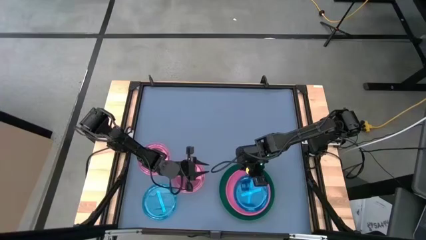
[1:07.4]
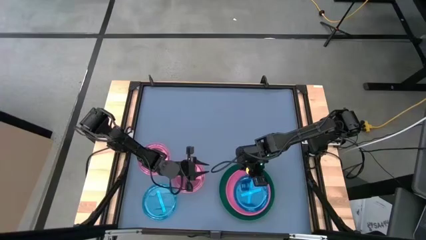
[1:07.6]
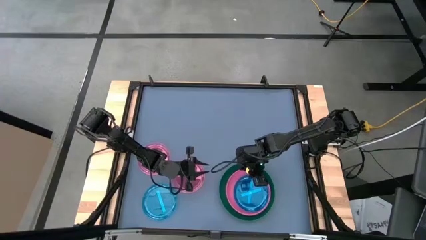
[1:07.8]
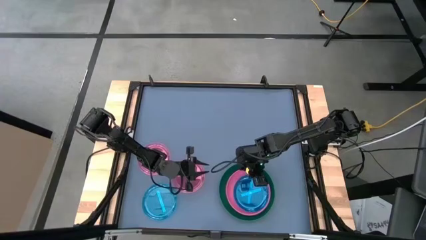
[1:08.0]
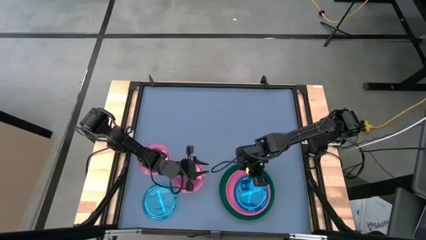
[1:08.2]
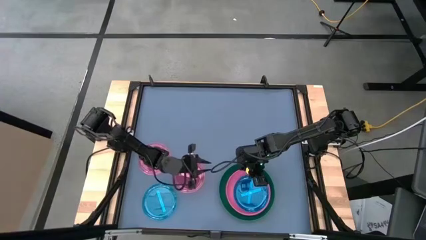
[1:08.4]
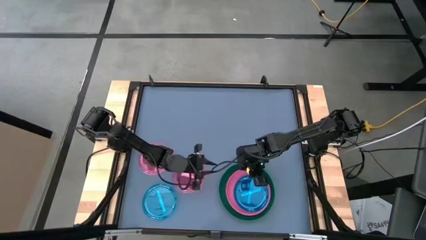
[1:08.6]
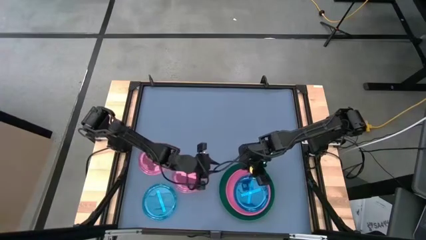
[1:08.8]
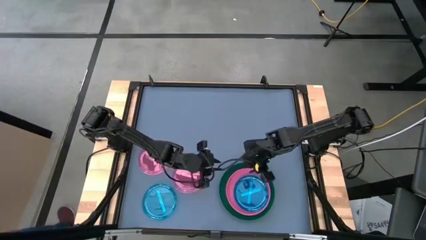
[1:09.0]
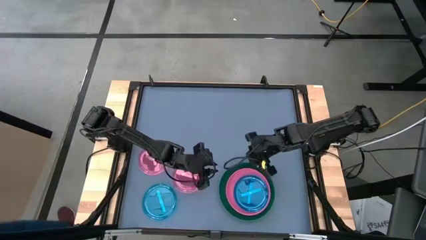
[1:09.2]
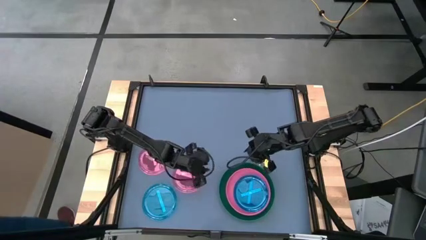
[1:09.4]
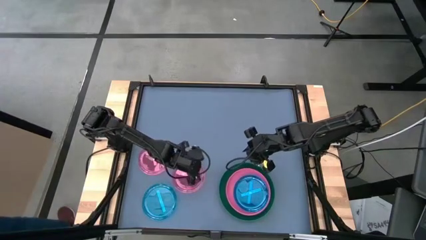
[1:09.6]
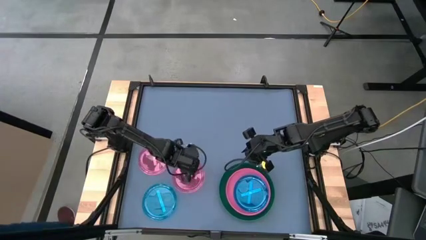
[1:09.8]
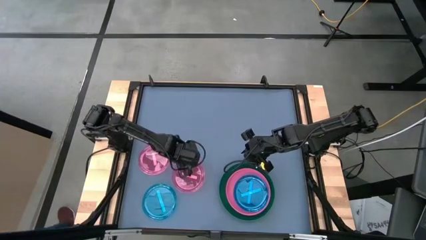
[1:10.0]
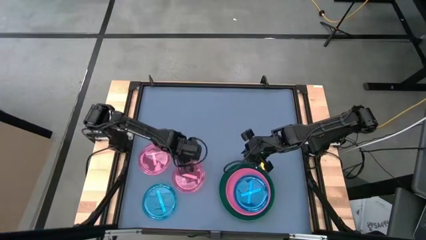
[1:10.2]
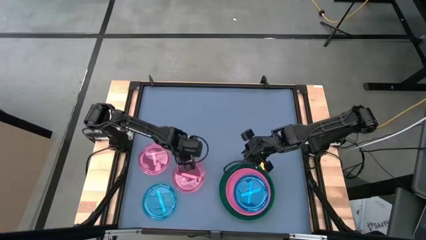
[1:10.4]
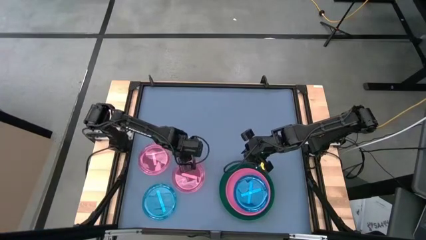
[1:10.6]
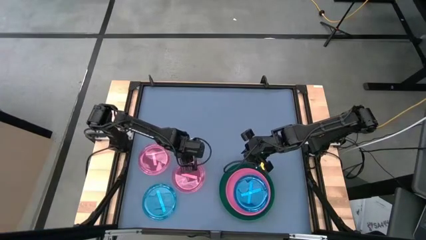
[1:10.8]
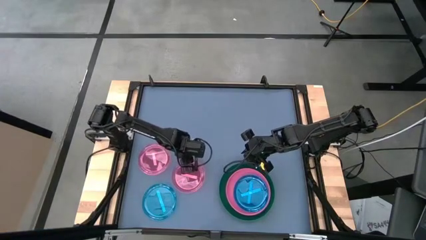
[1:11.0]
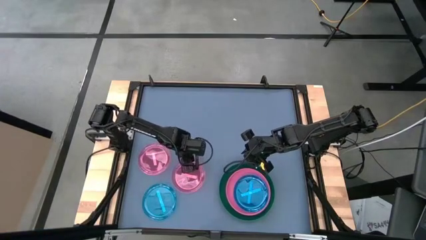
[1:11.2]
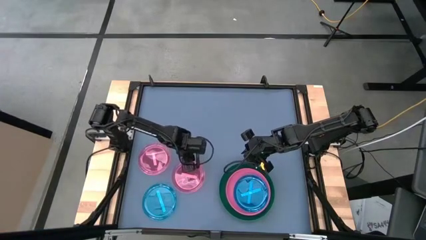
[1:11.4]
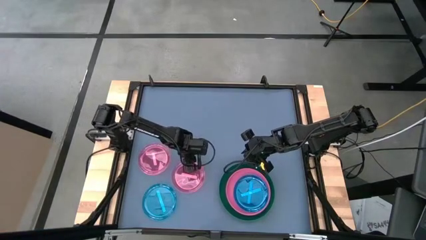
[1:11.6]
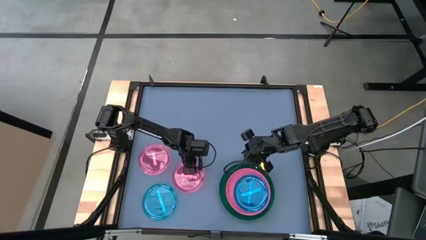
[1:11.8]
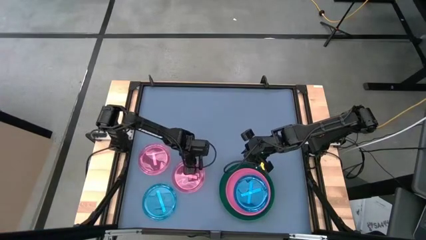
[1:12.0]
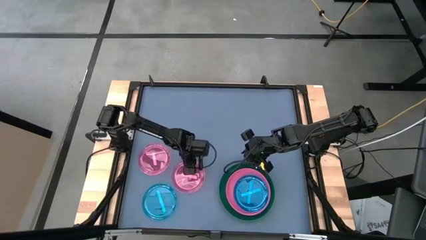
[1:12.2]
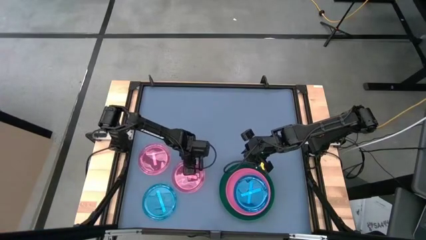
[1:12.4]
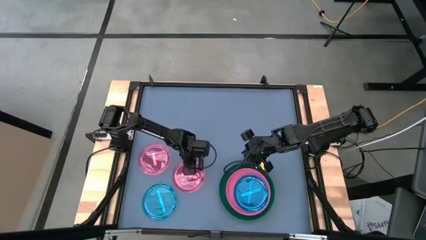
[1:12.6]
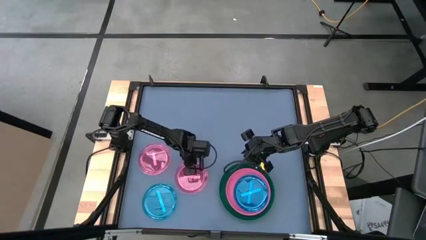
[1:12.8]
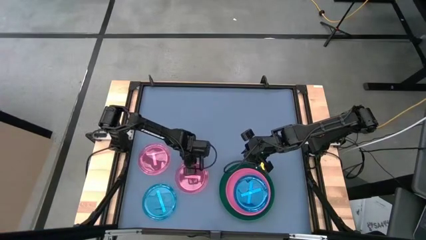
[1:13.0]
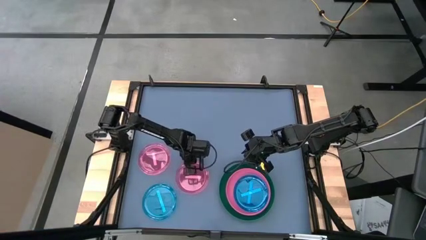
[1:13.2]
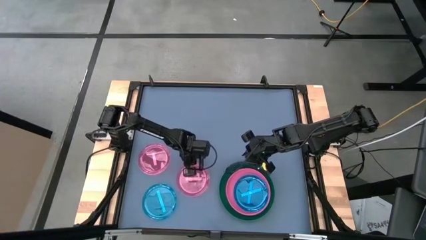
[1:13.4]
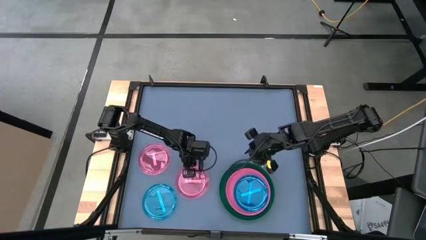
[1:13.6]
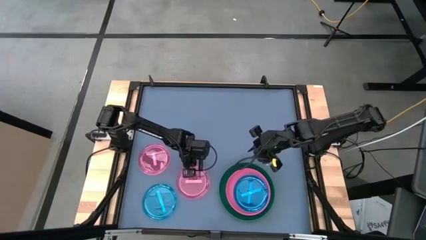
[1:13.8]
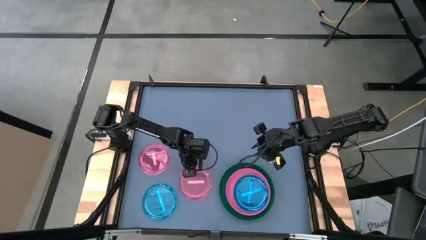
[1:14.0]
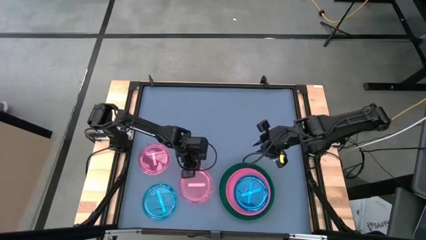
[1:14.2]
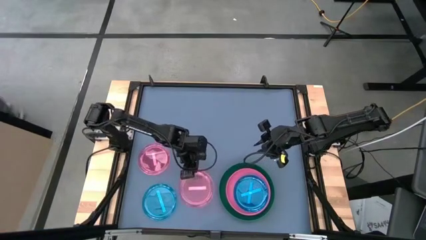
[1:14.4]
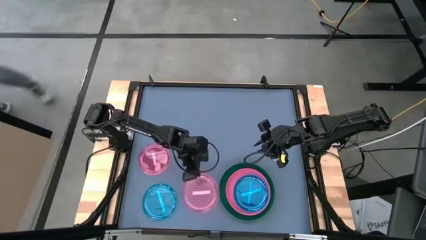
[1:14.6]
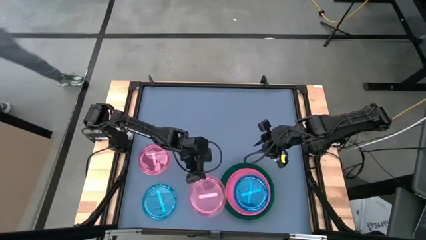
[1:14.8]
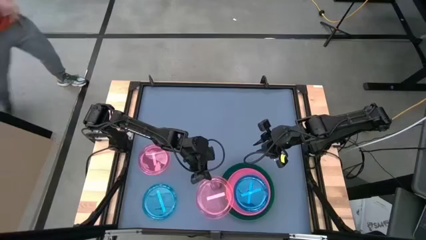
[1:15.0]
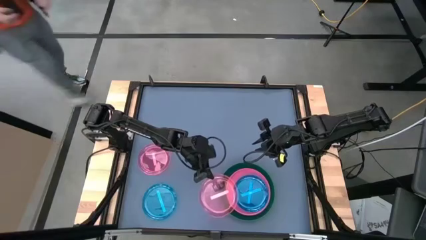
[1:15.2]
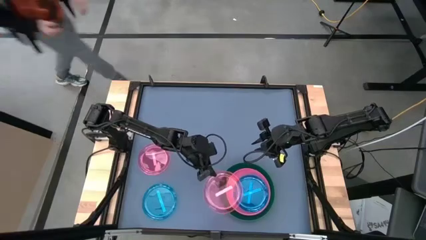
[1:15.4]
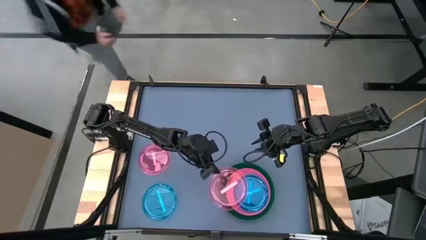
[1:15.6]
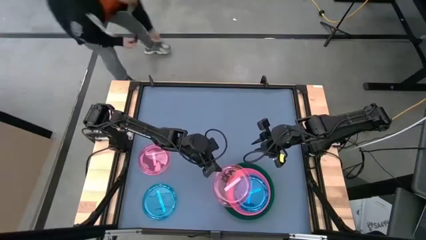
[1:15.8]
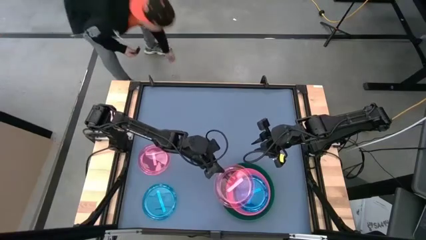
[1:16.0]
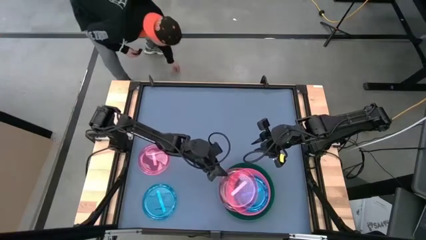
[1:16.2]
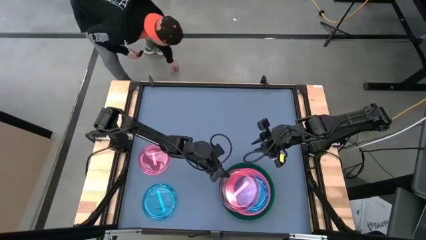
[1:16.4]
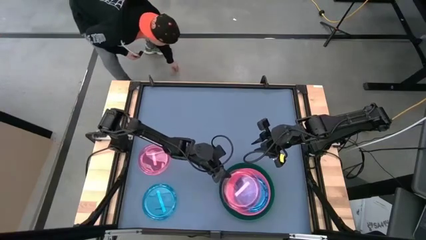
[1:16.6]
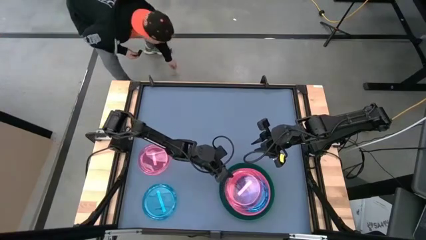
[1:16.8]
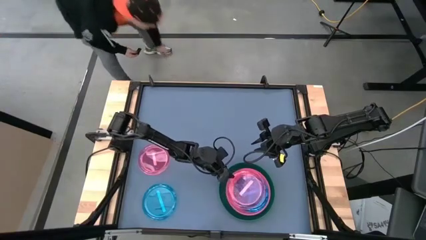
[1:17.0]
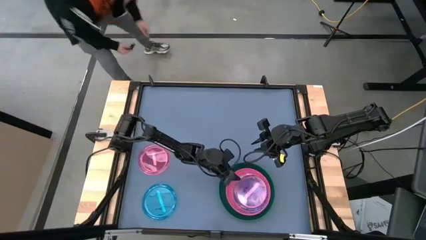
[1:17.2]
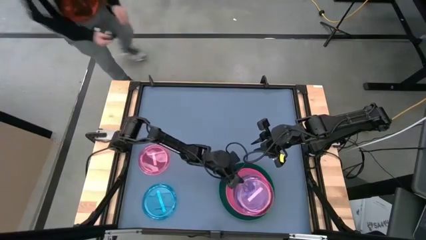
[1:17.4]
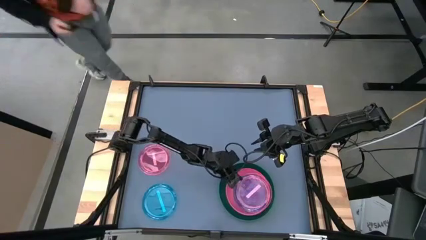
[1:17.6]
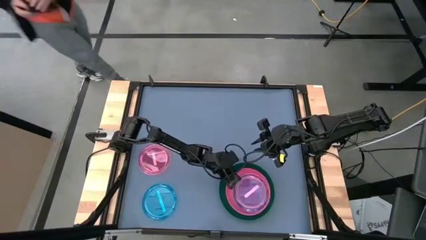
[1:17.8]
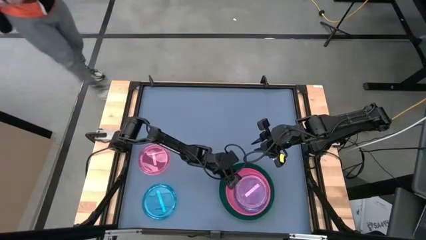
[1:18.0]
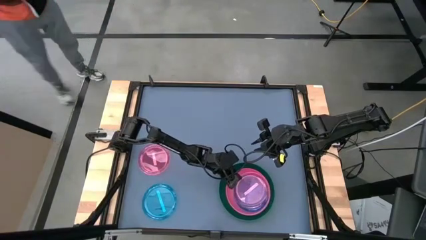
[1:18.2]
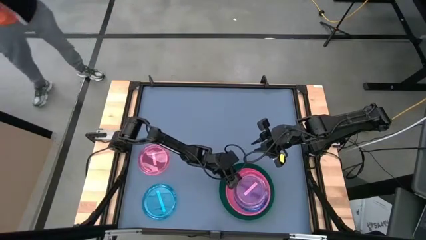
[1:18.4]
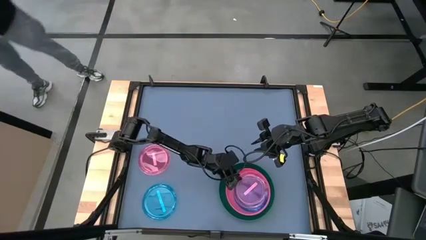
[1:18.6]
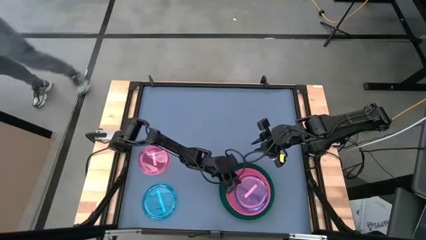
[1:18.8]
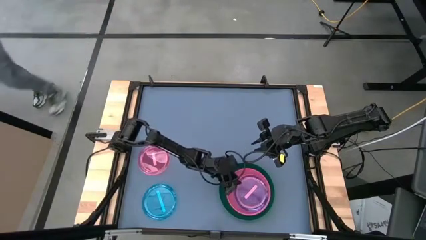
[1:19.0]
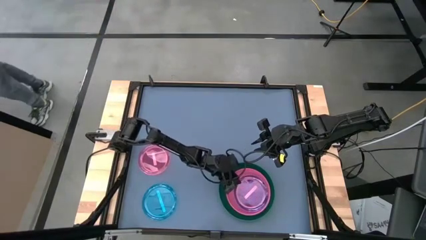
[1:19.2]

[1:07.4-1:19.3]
Task: Stack plastic plates
Stack the right light pink plate on top of the blue plate

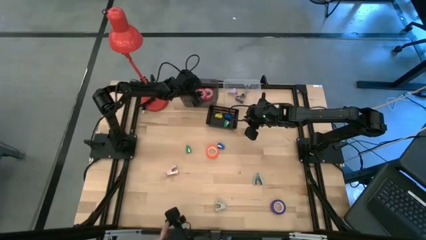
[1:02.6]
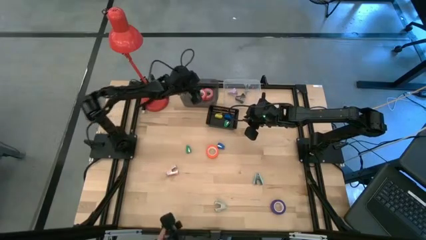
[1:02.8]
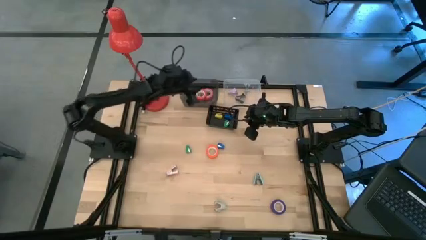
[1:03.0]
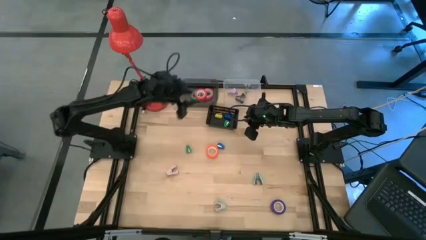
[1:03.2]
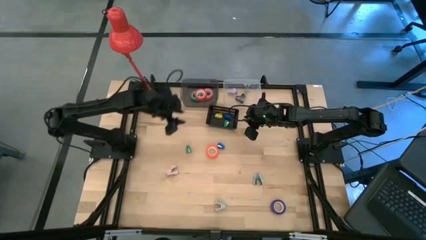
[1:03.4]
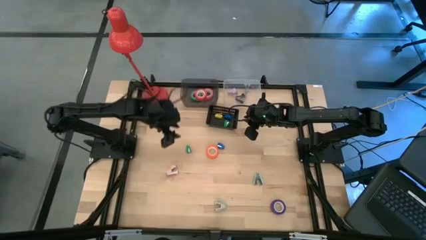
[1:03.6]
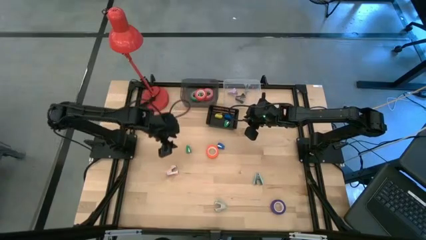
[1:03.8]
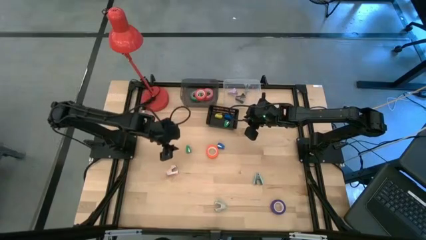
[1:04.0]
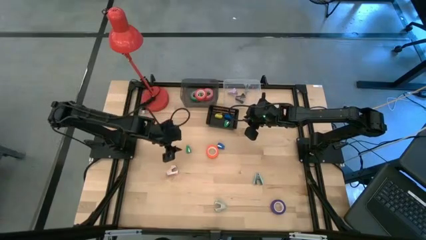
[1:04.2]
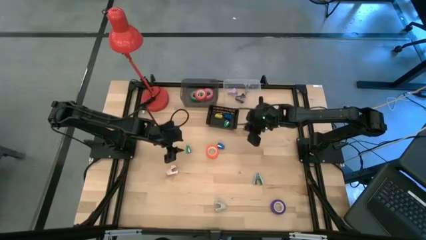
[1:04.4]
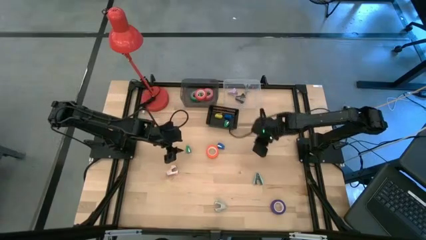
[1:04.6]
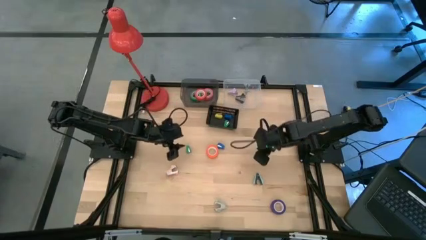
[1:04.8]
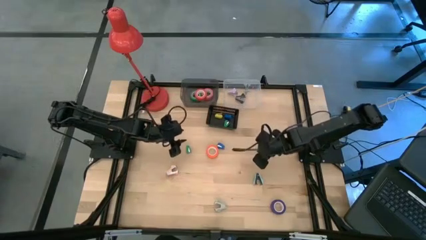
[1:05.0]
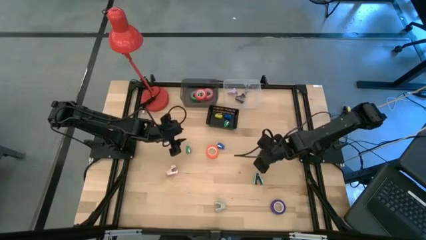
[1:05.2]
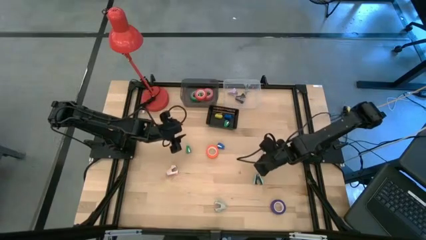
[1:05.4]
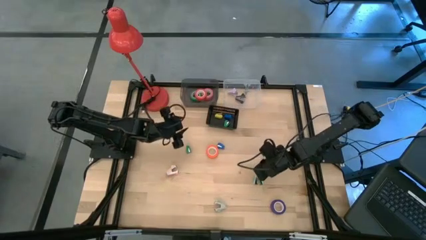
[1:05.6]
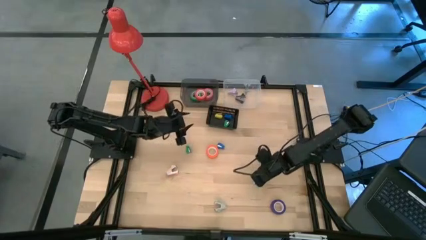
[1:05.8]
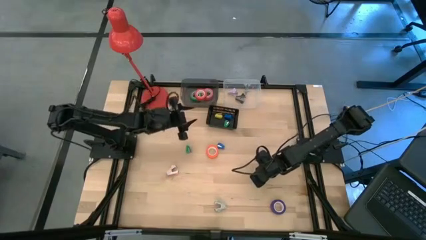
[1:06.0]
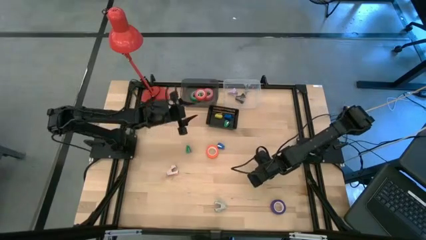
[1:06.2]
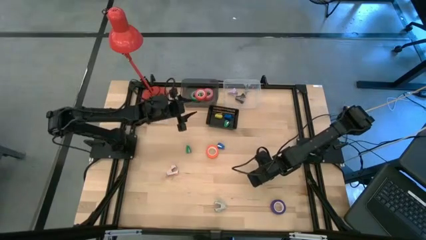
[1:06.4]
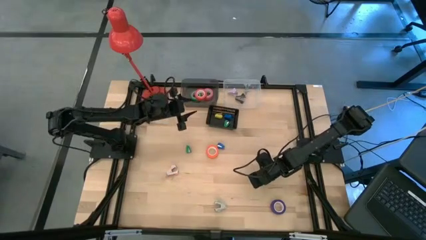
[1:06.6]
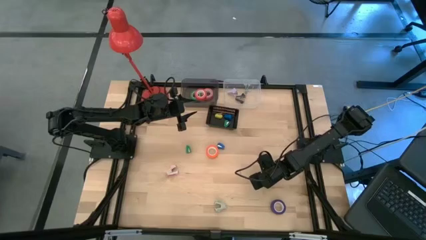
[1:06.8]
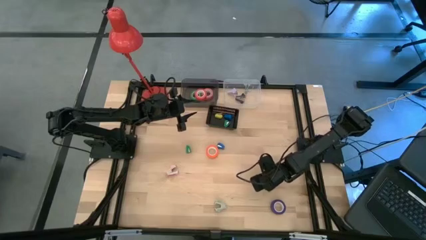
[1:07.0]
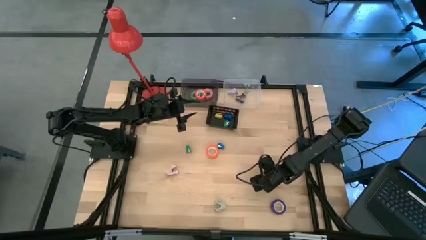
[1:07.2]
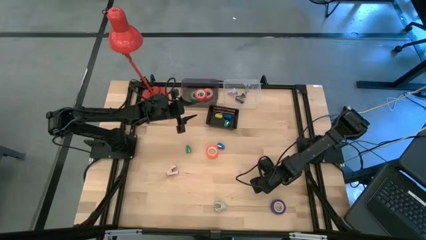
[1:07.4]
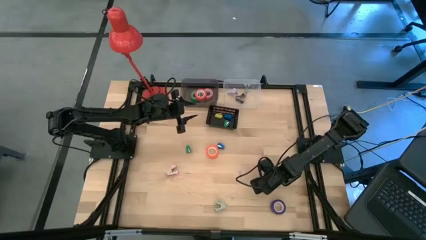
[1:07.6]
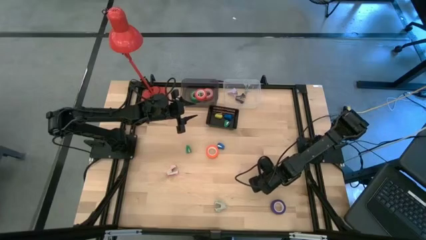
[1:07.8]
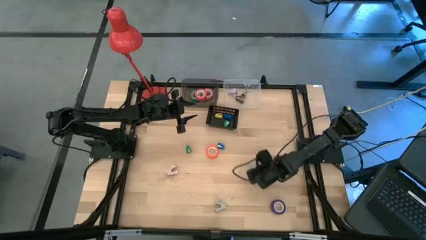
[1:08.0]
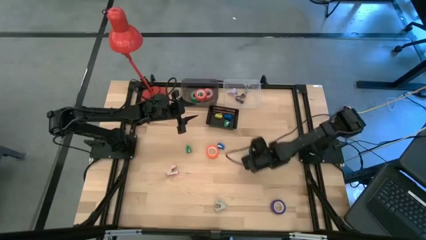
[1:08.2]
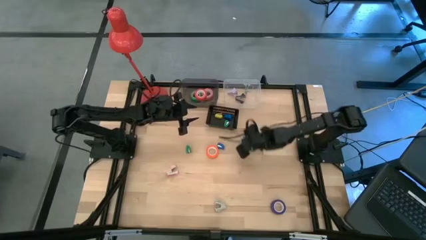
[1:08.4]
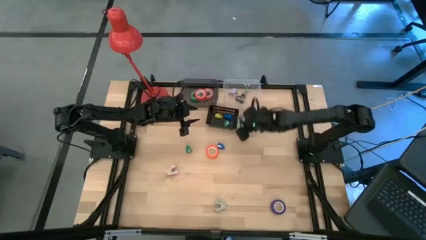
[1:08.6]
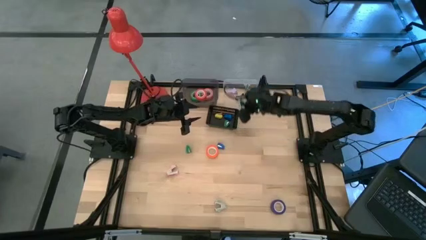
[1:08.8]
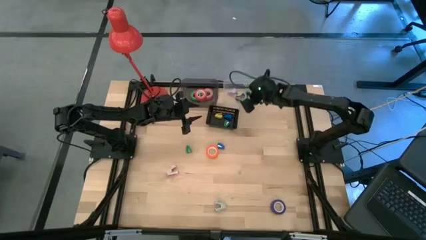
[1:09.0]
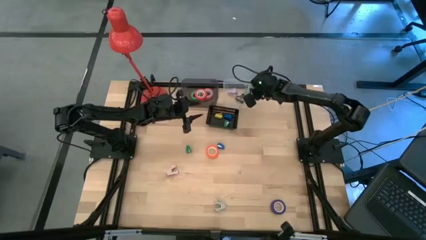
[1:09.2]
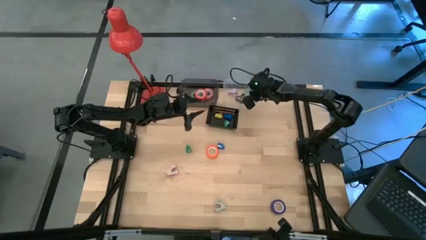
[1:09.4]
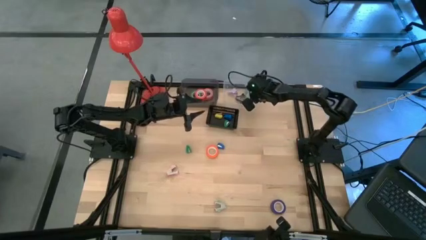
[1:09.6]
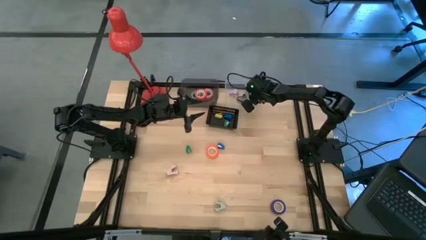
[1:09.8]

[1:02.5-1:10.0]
Task: Pick and place Stapler, Stapler remover, tape
Put the light green staple remover into the transparent bin
